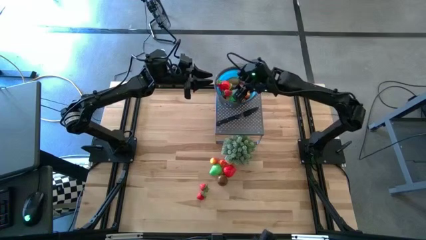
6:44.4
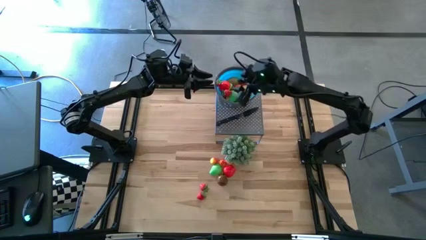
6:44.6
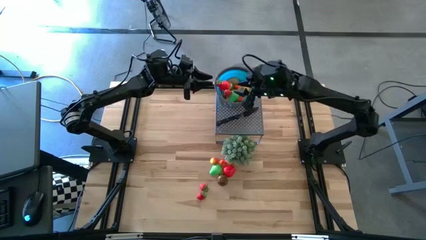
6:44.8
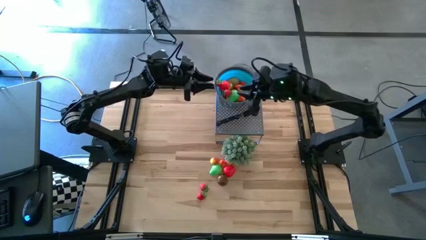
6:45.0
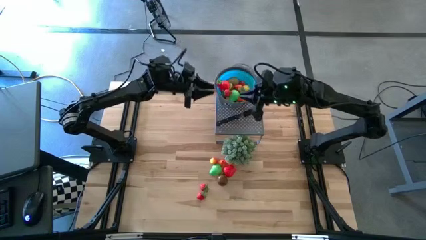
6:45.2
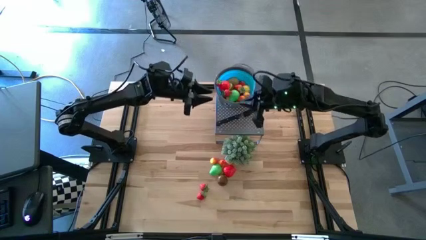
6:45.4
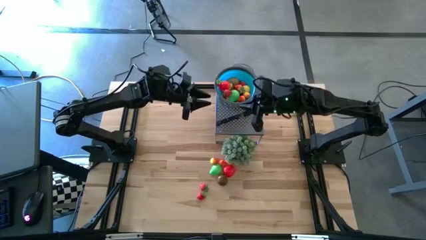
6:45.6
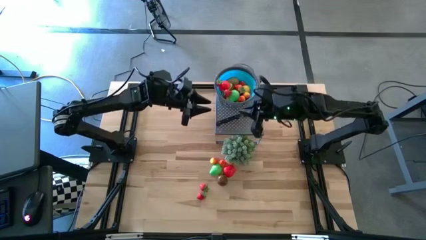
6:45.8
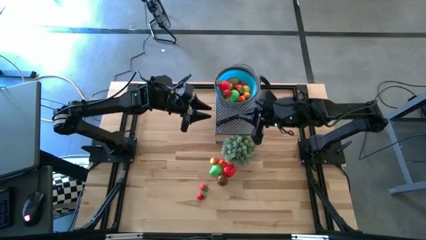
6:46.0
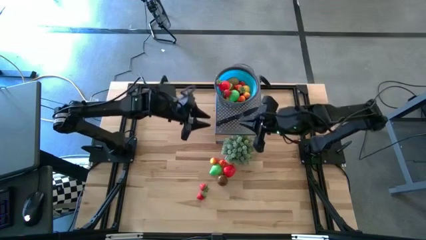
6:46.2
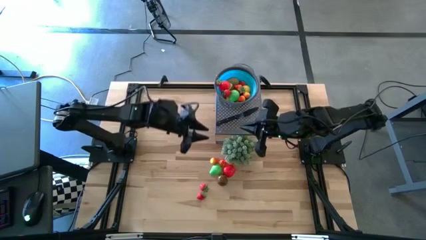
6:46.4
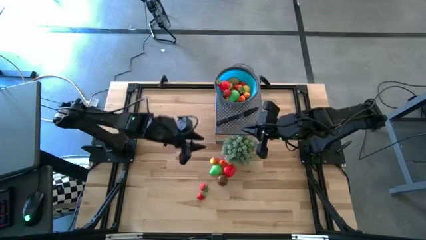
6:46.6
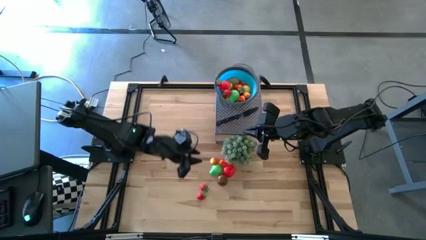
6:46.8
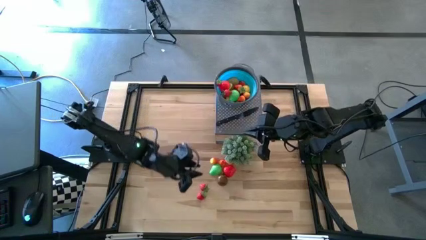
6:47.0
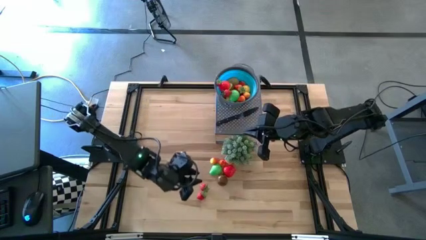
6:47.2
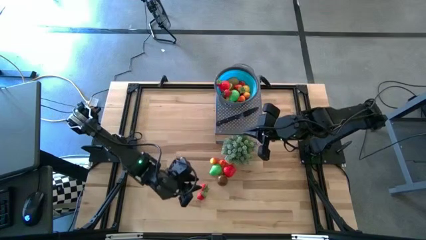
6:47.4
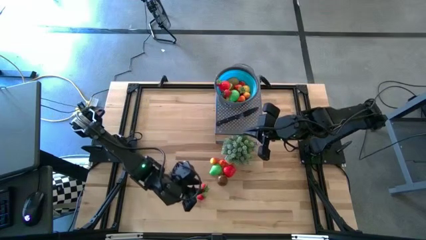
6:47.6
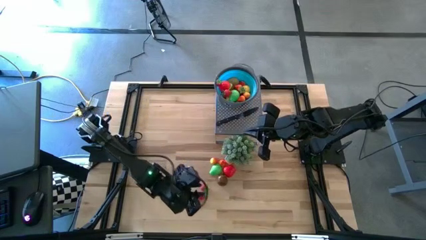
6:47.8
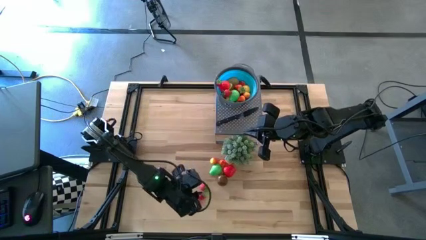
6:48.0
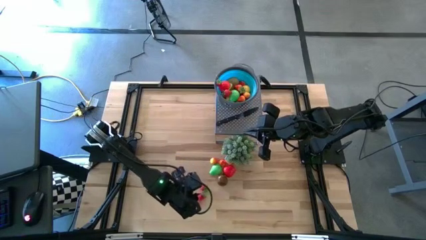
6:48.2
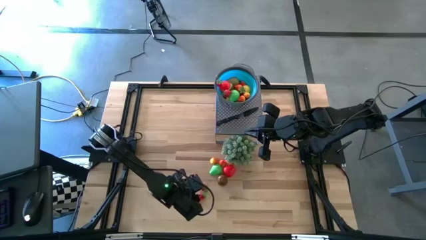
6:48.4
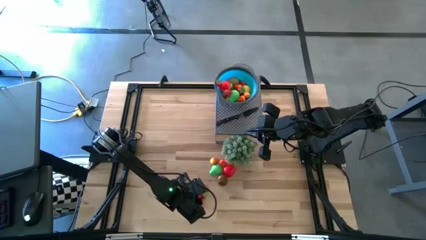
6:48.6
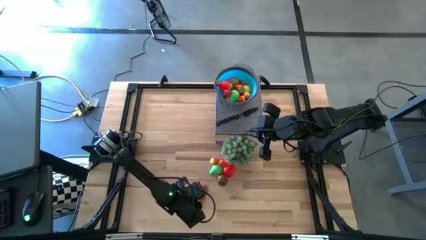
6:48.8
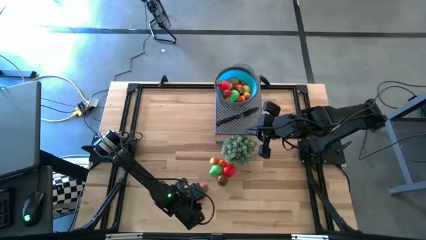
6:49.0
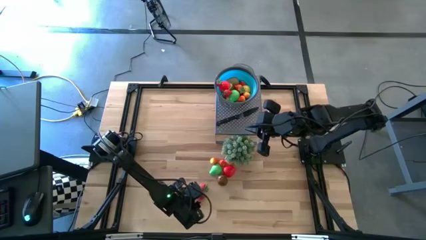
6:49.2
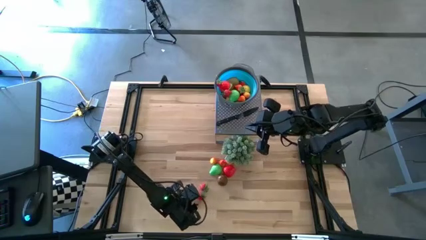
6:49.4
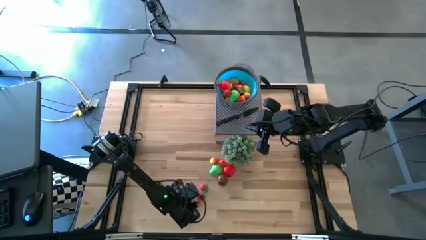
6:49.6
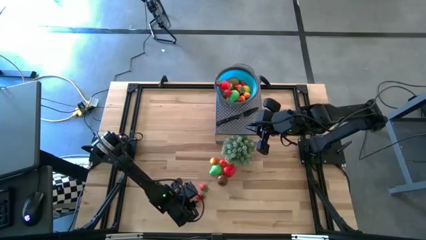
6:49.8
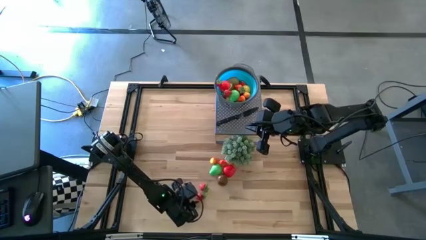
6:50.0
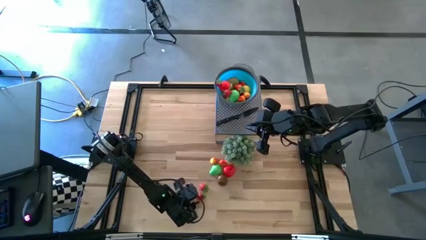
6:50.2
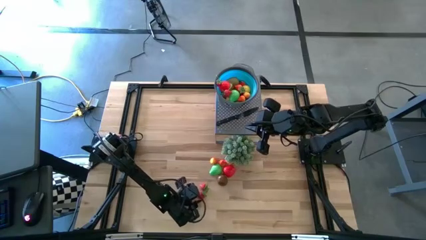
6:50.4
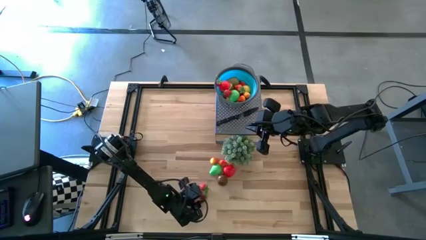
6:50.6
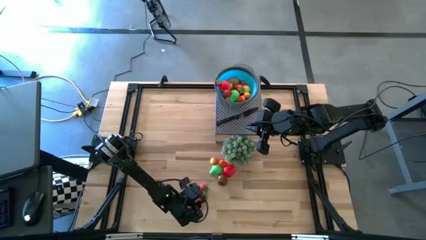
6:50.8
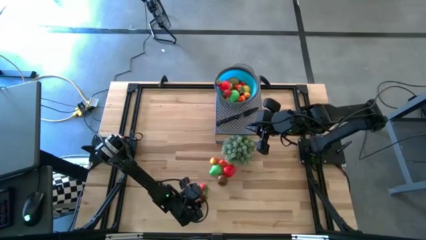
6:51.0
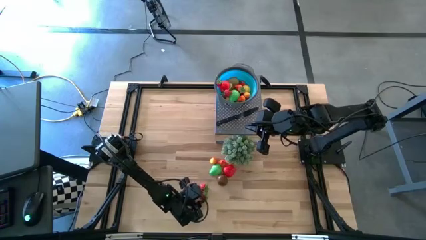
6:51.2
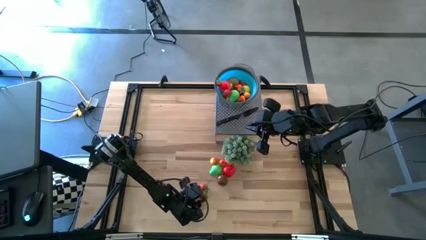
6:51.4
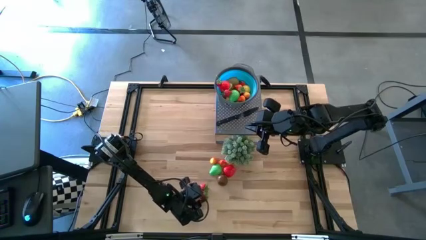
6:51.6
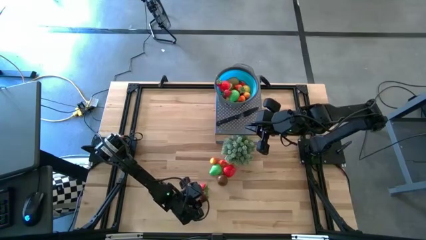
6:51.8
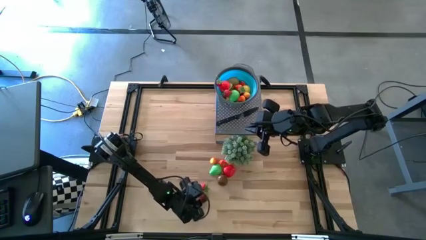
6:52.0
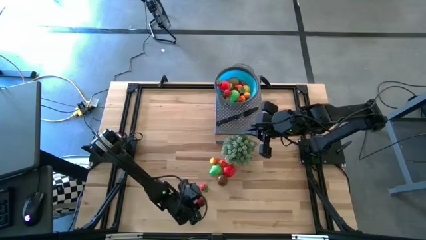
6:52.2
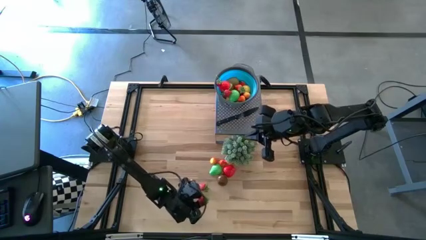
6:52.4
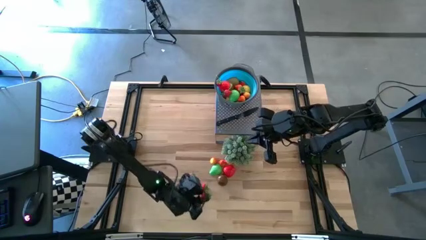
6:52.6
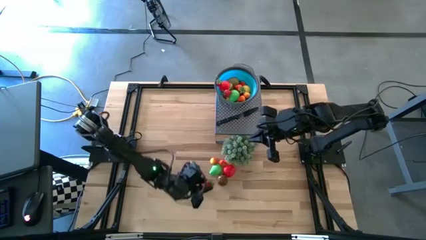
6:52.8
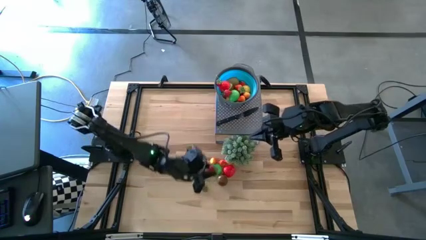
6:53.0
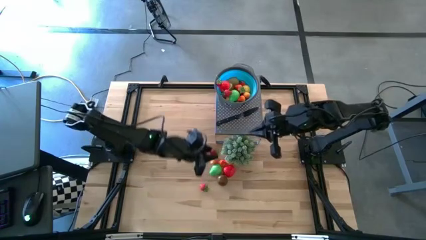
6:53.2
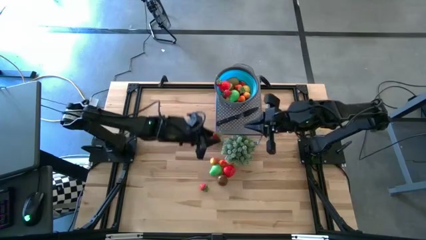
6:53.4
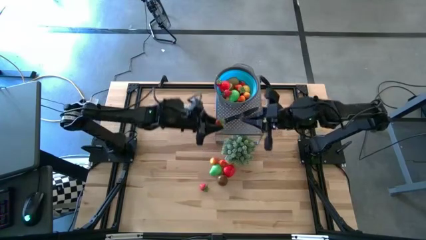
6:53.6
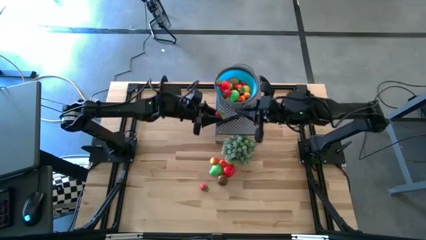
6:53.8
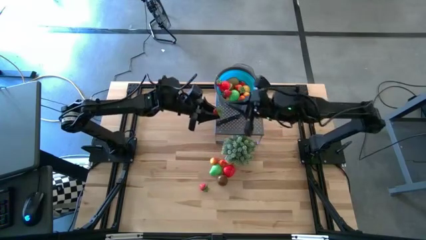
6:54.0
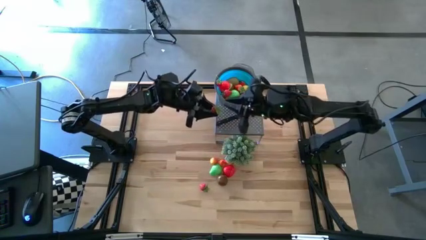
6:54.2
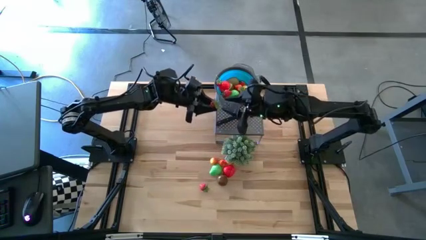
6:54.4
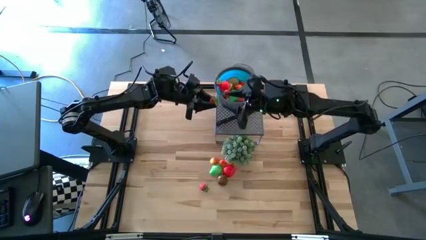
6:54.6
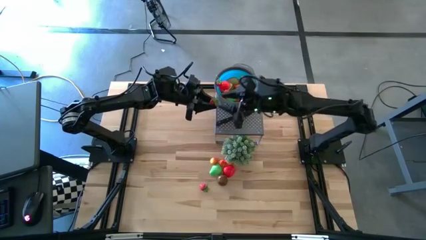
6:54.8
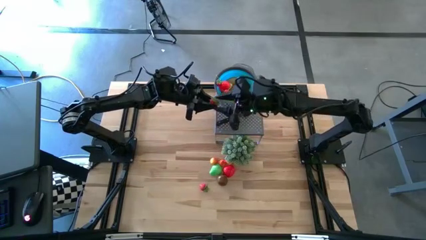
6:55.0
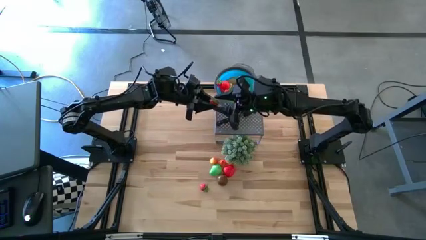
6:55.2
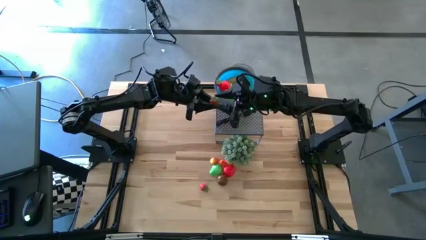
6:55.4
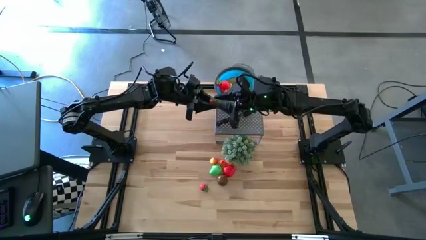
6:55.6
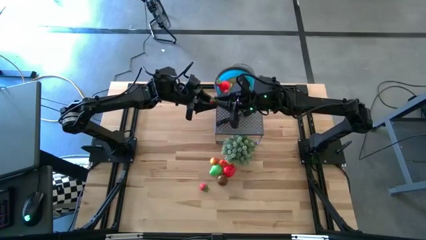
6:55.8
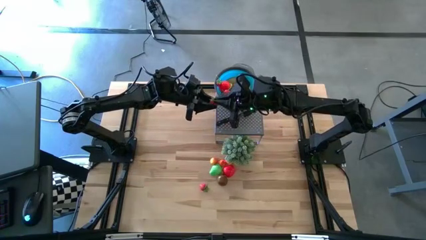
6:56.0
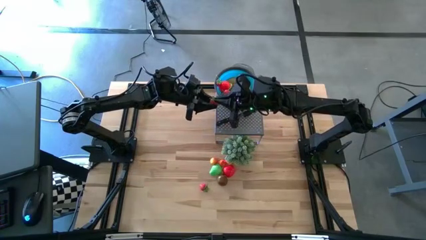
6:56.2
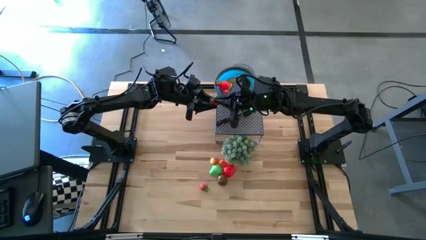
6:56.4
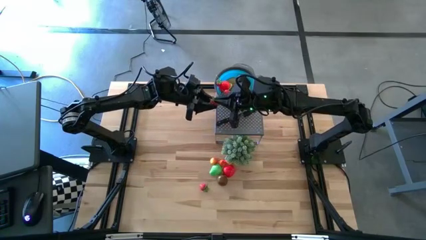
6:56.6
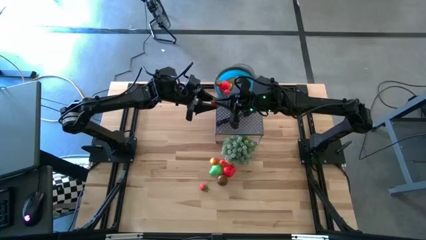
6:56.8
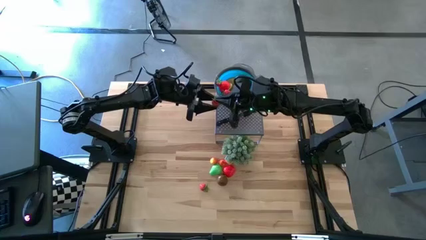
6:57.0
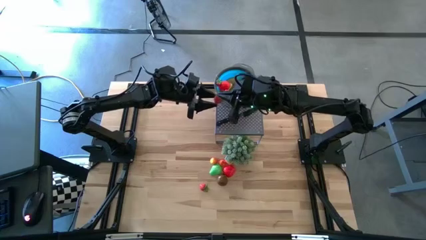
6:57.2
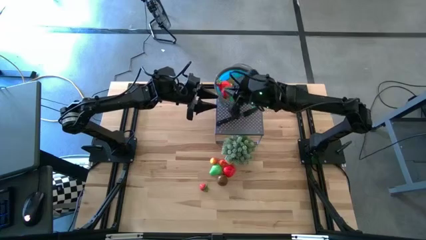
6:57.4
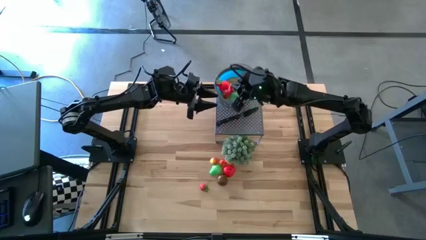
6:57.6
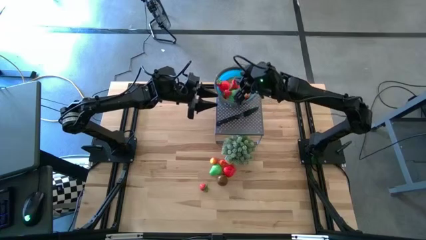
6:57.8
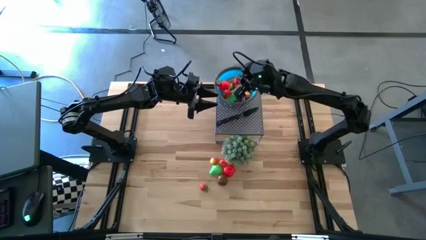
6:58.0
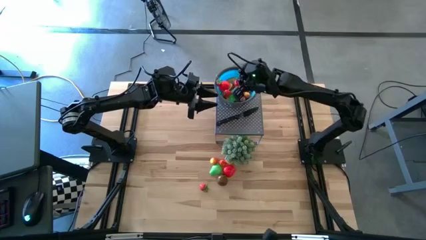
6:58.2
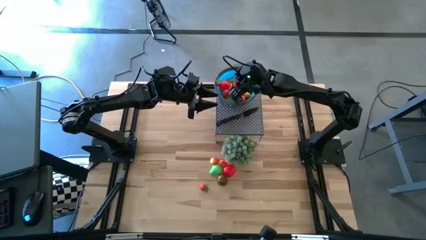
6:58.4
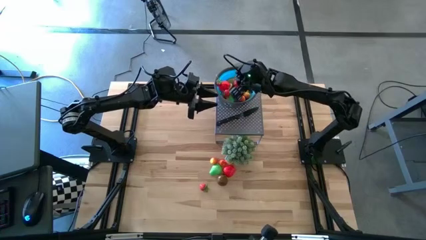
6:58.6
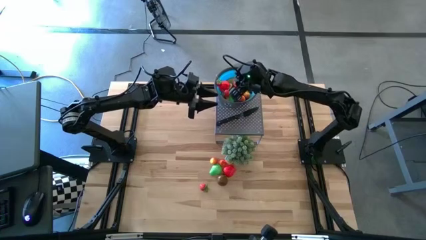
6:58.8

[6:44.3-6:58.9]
Task: Pick & Place Fruit
Put the red strawberry into the blue strainer bowl

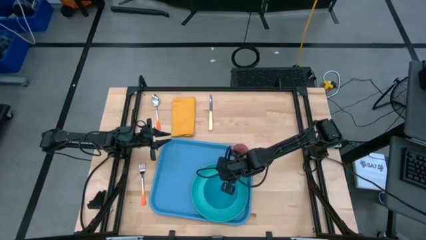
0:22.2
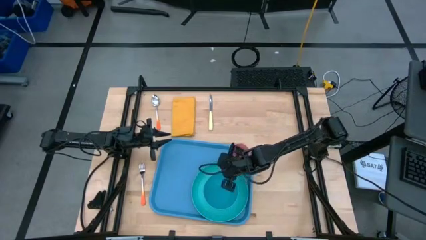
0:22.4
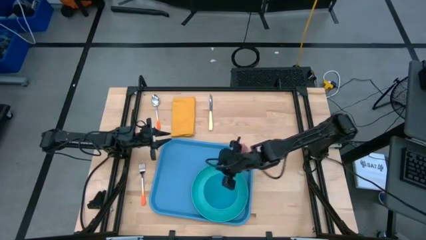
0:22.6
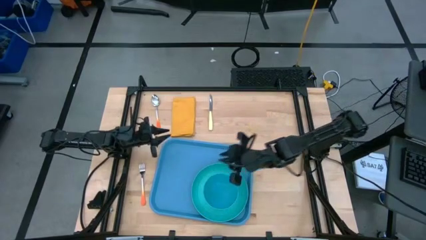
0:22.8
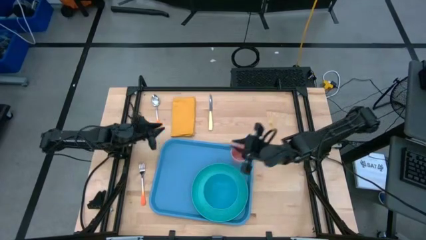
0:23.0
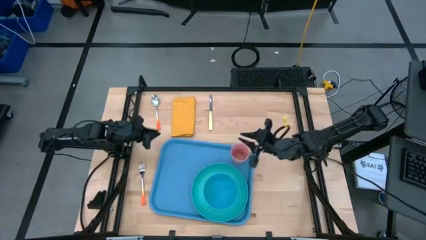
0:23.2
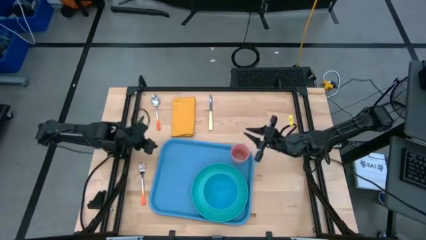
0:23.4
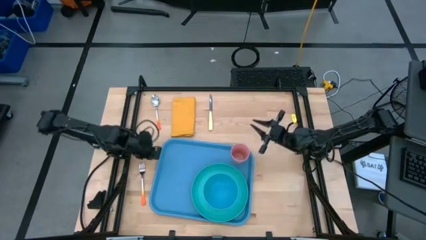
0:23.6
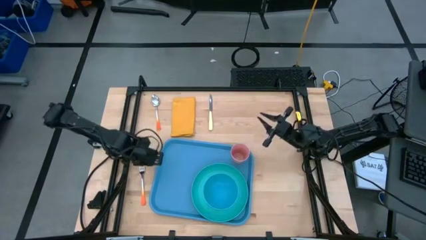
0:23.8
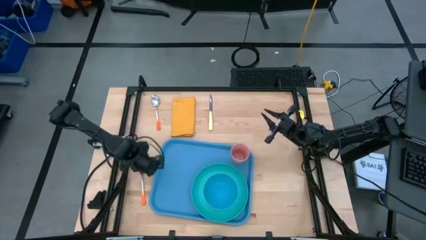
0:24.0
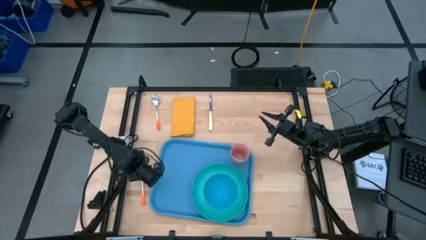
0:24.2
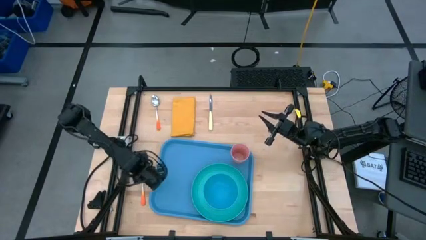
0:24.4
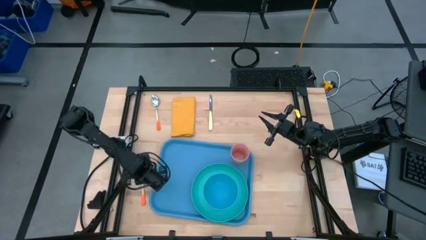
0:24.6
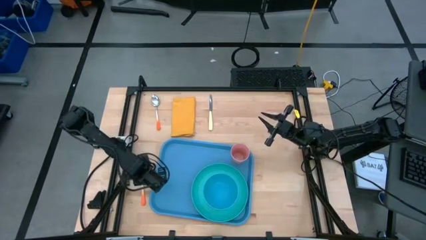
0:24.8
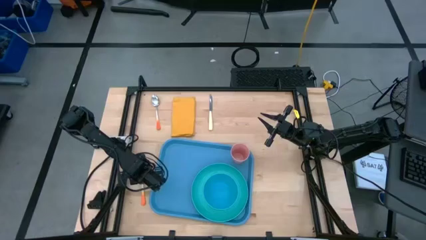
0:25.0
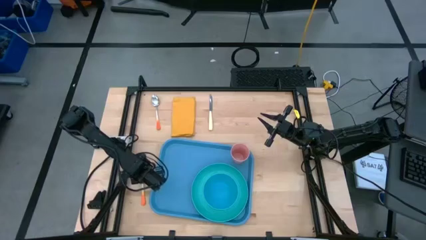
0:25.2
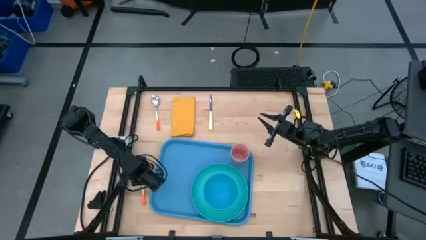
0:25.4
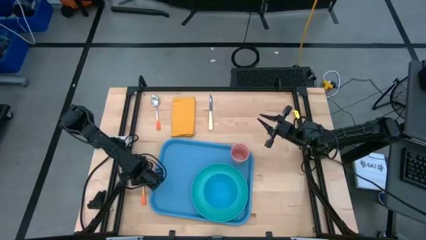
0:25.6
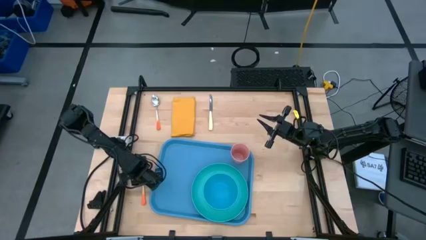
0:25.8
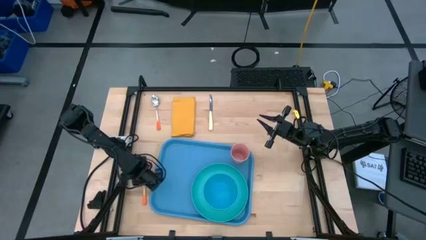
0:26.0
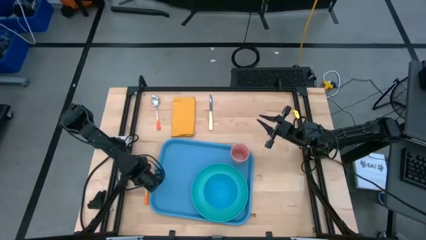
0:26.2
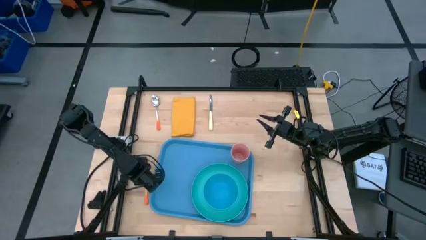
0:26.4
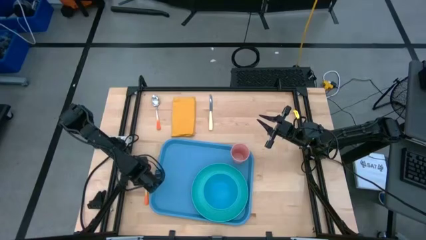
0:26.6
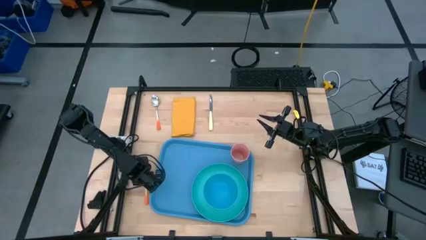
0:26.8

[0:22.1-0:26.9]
Task: Set up tray
Put the orange fork on the blue serving tray
